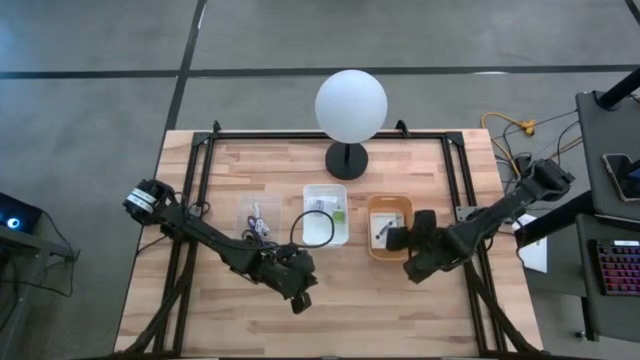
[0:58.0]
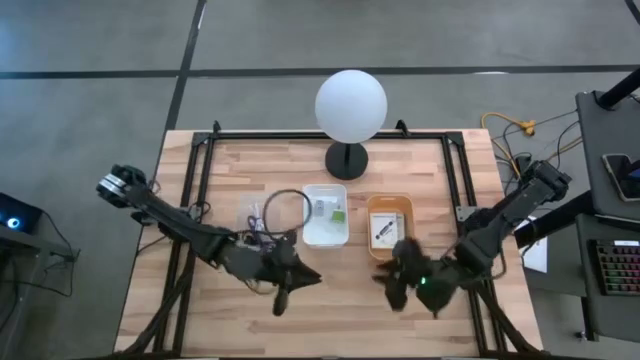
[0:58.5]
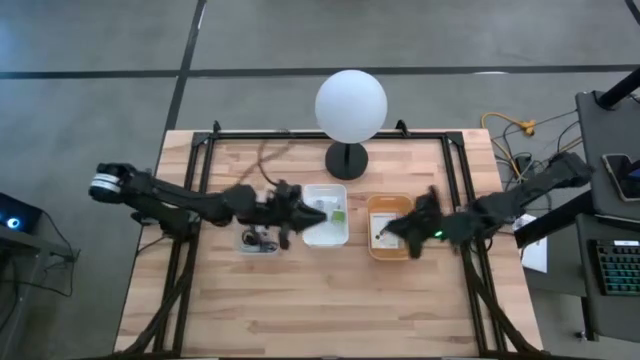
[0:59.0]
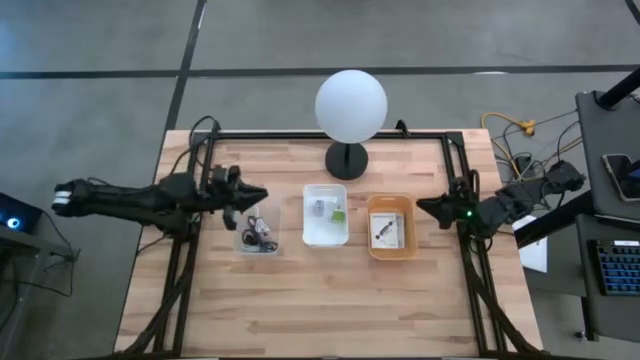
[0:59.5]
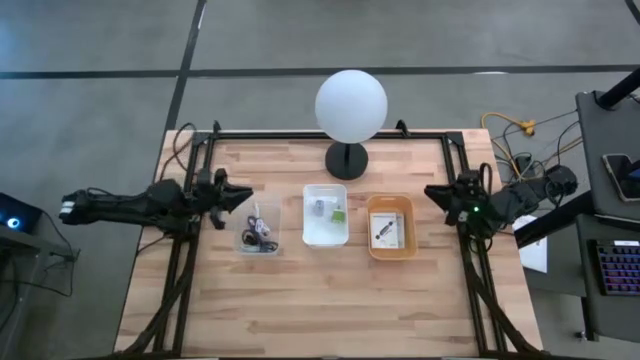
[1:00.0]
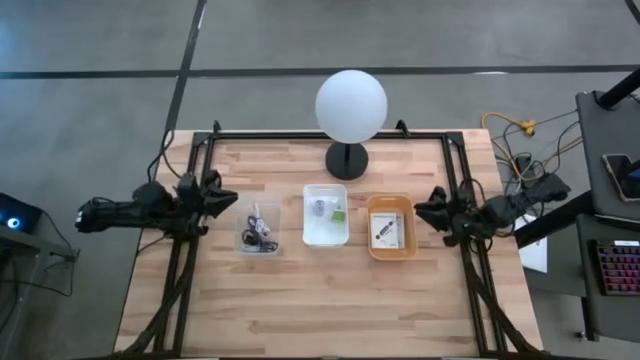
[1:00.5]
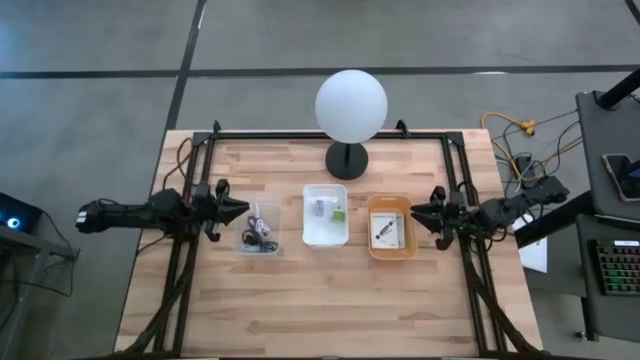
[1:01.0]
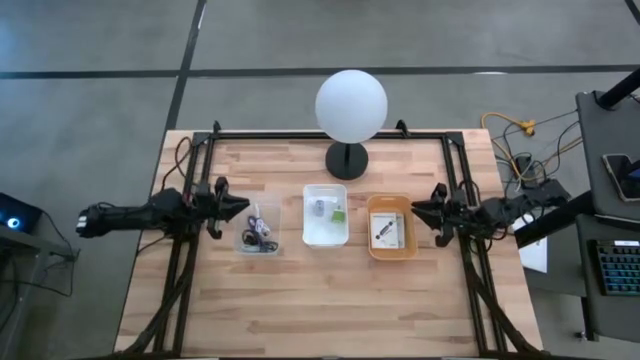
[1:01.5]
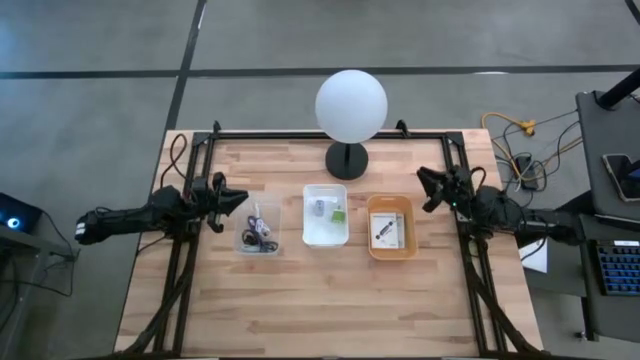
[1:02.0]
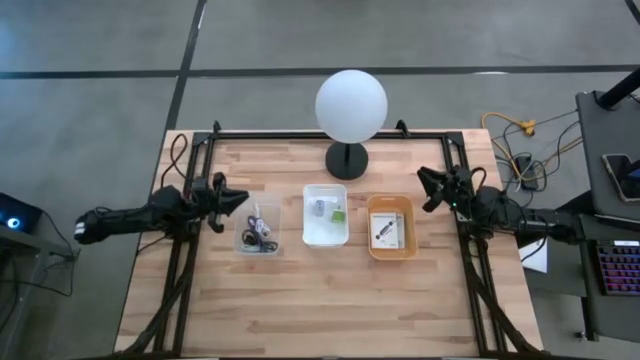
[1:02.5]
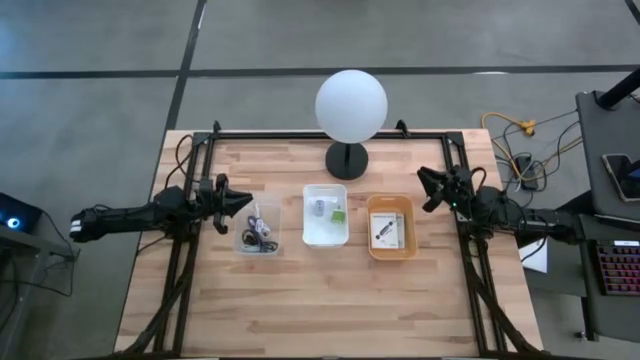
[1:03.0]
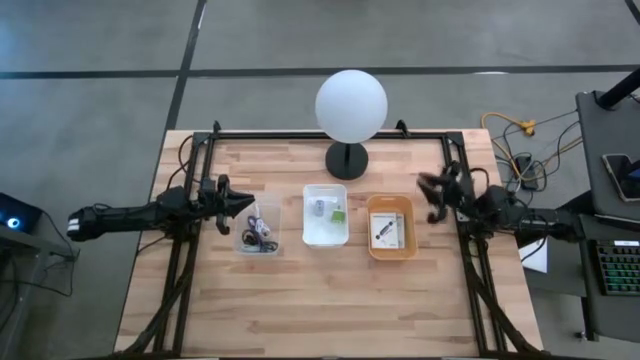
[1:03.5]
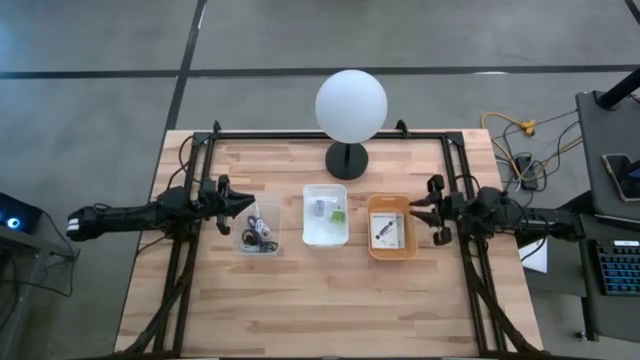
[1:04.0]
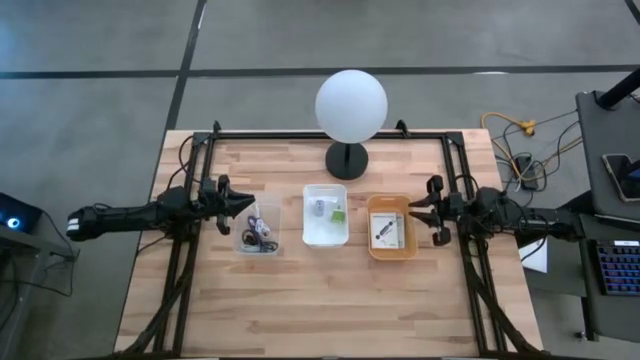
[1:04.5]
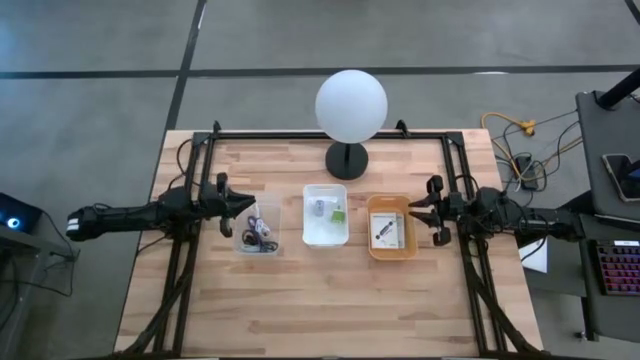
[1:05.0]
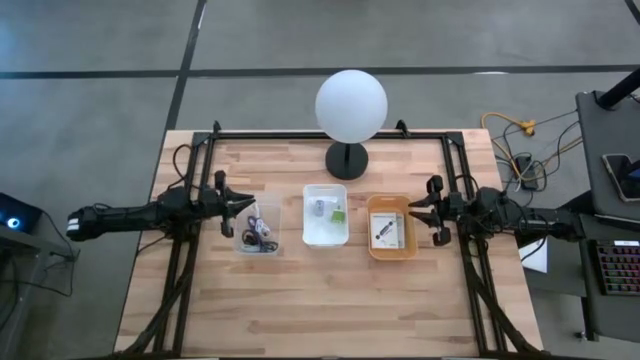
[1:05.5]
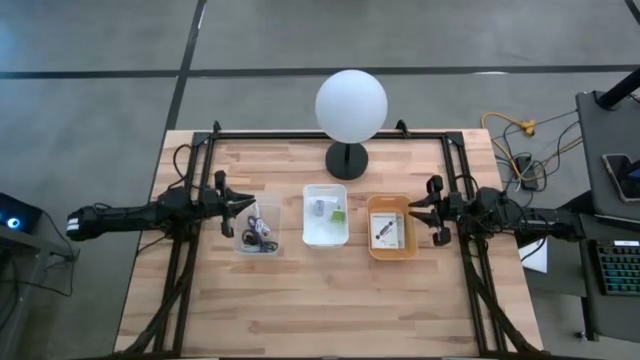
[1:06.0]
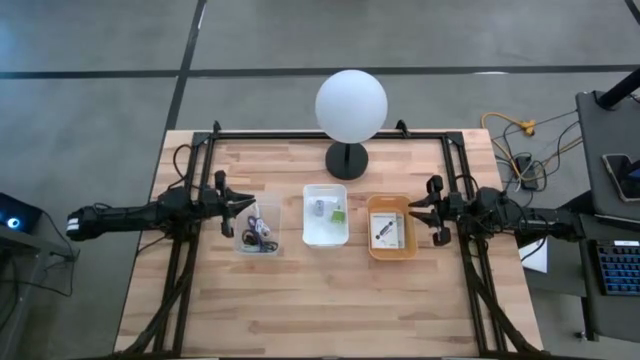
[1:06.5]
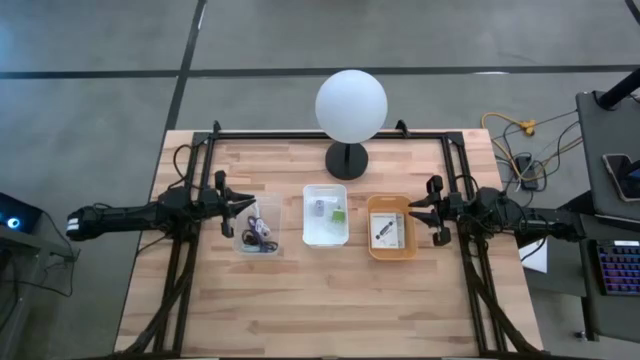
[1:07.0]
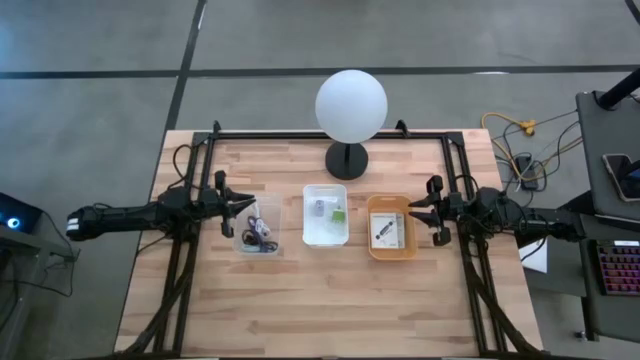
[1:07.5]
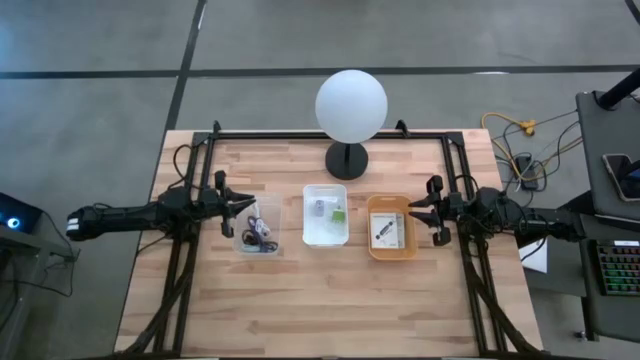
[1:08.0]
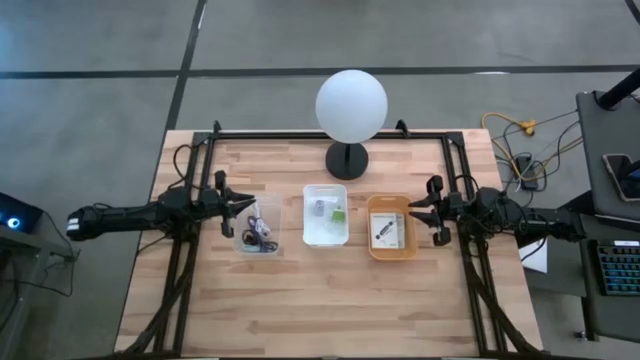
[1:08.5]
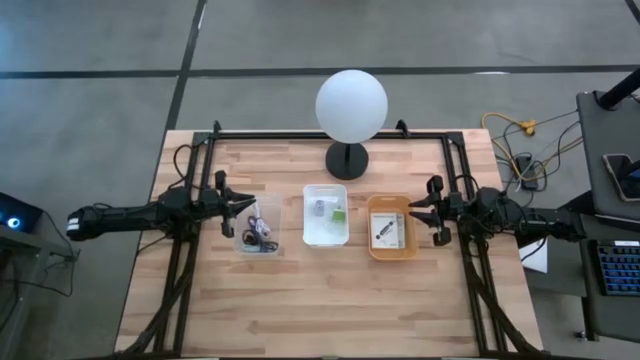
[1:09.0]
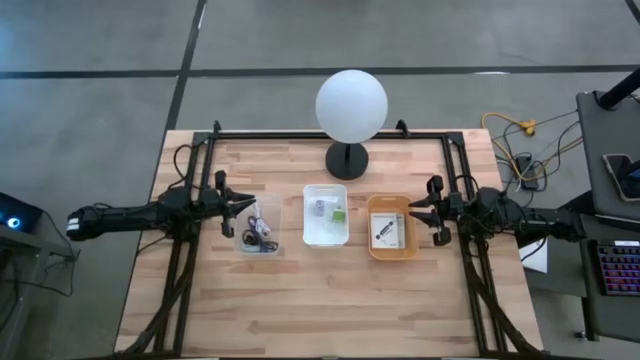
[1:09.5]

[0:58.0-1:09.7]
Task: Pick and place items into bin
Return to Home Position

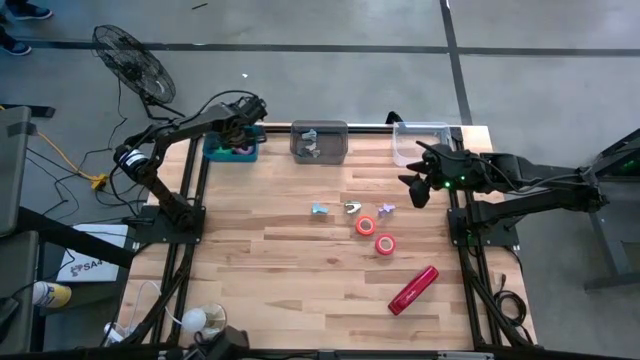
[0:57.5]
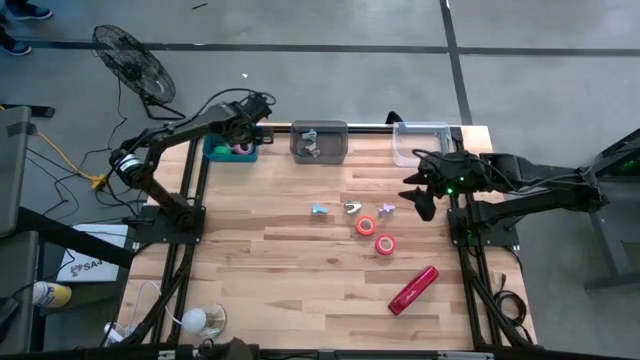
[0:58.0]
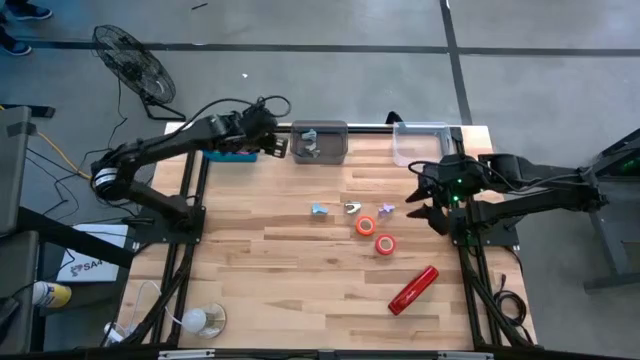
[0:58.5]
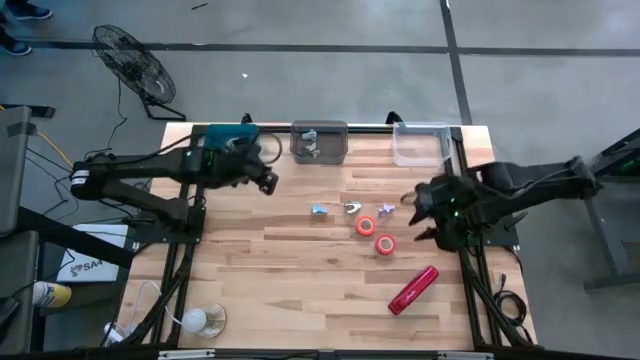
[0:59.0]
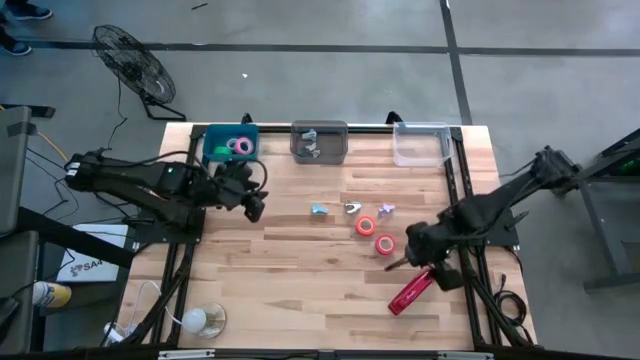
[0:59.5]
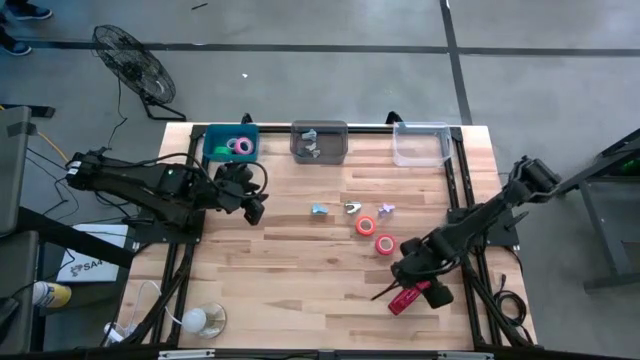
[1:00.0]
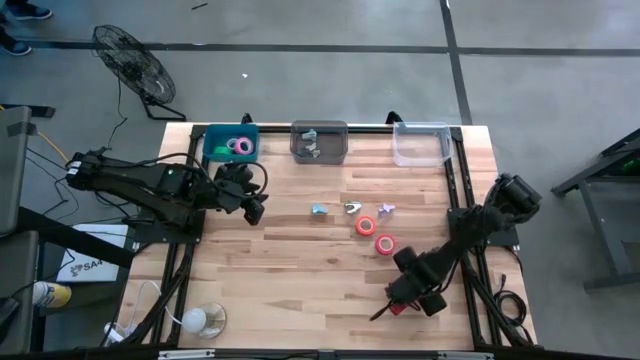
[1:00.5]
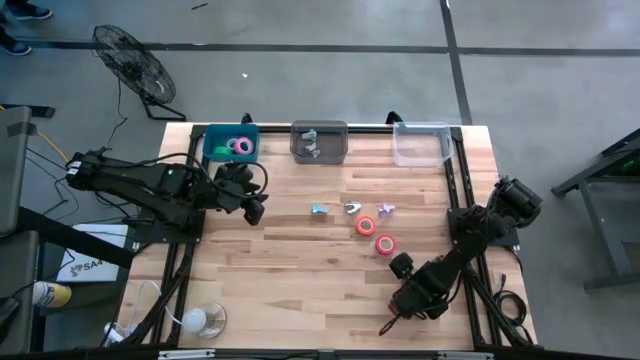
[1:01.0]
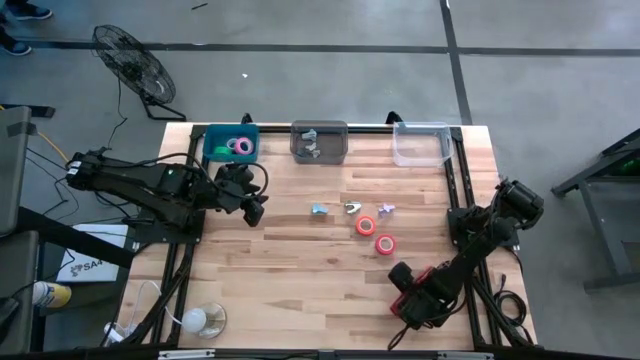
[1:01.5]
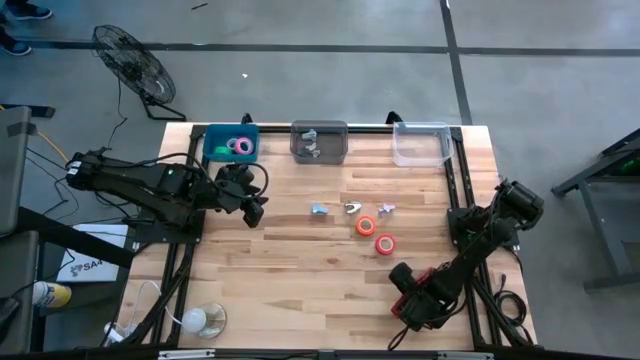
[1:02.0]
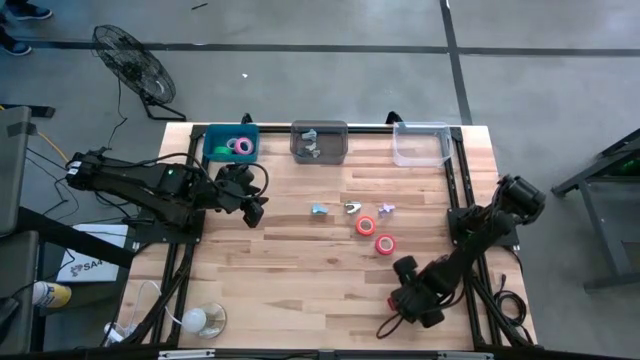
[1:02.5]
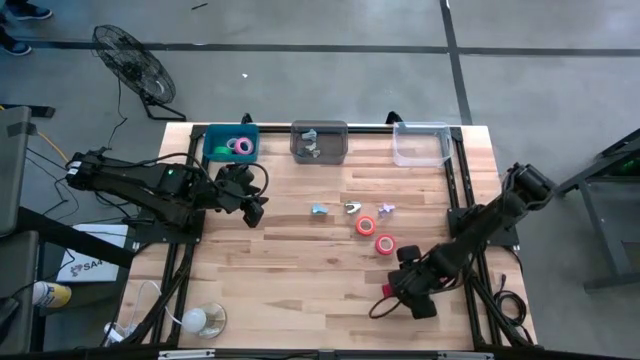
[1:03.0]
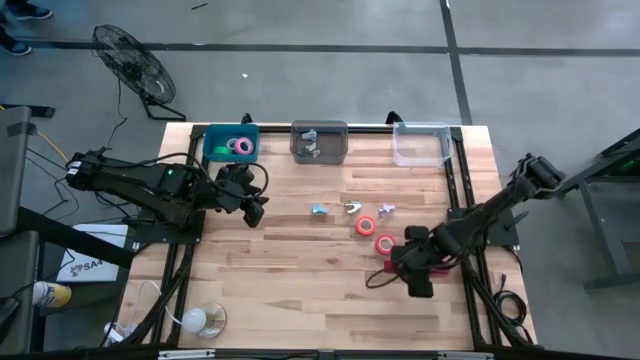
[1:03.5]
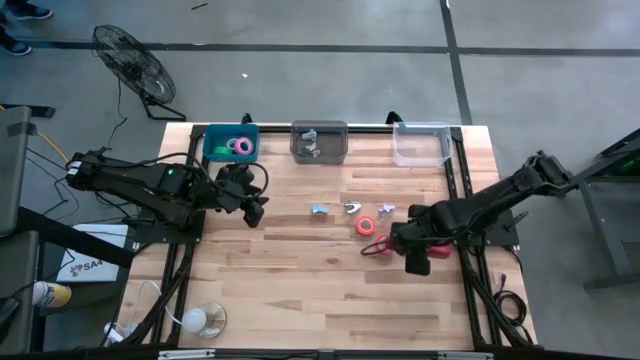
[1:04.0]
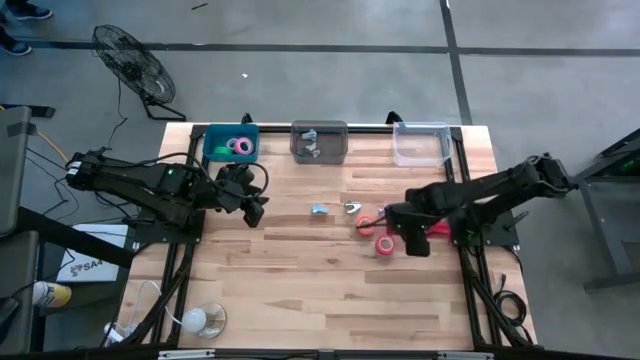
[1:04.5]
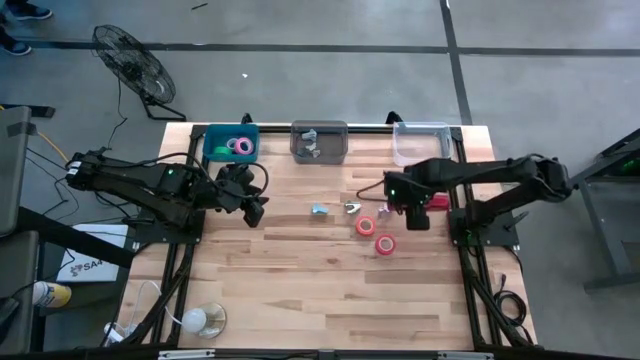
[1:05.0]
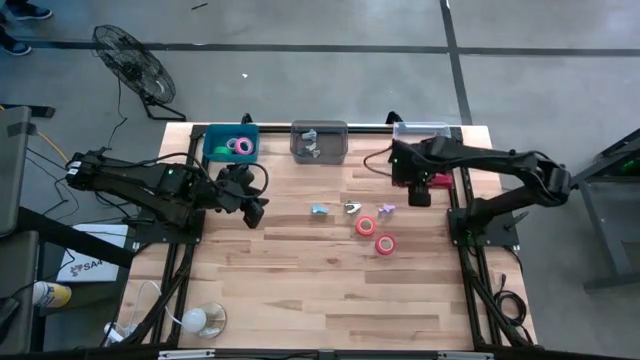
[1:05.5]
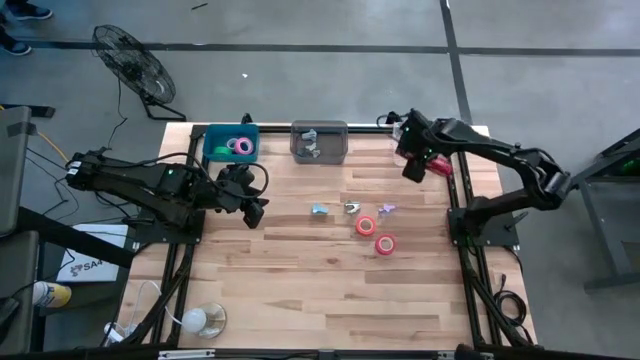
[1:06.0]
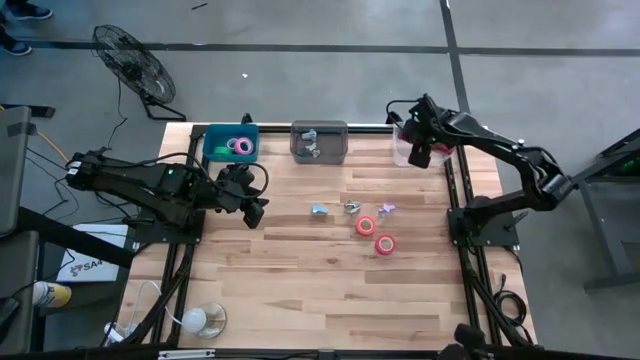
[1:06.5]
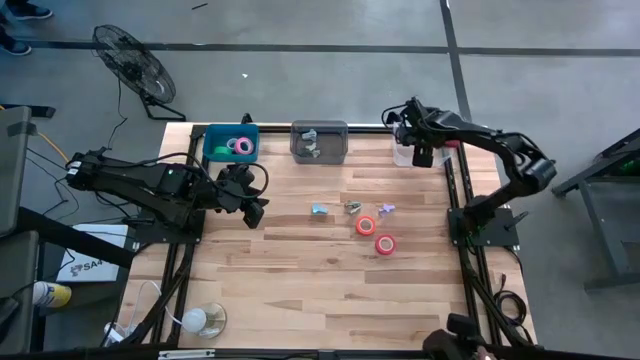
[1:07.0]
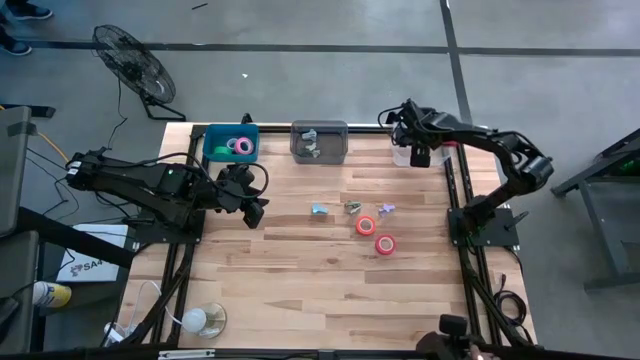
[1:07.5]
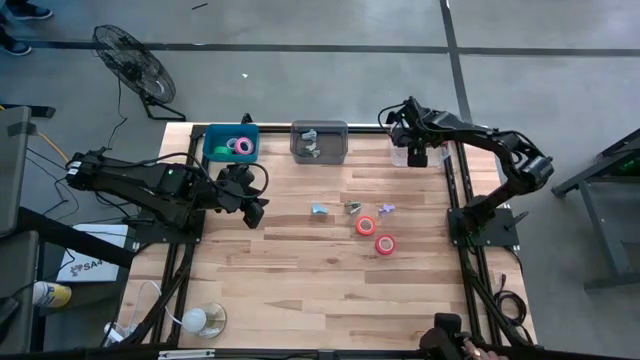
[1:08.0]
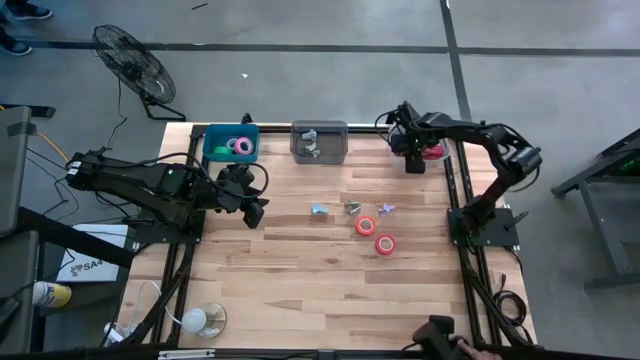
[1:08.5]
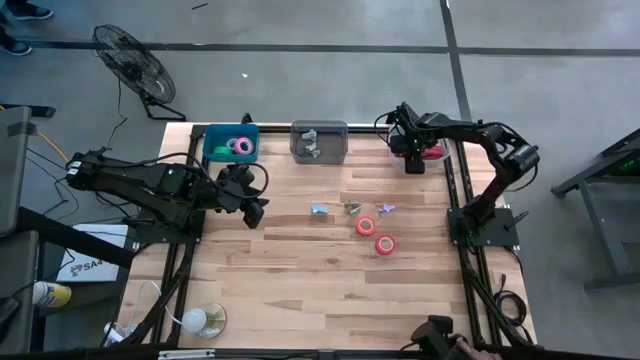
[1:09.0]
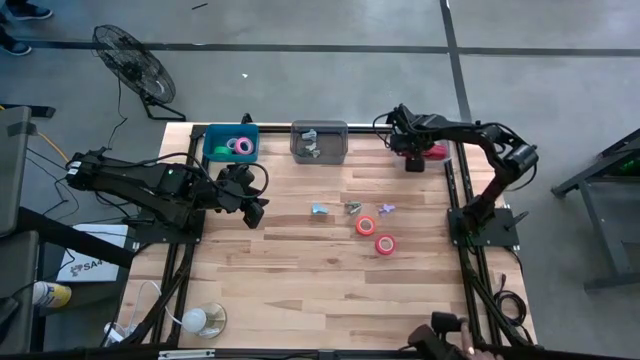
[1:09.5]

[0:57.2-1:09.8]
Task: Pick and place Stapler, Stapler remover, tape
Put the red stapler into the transparent bin
